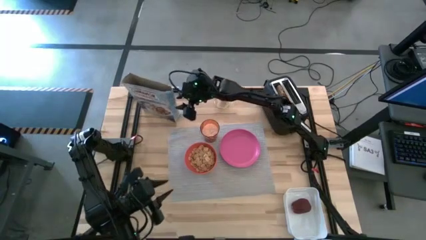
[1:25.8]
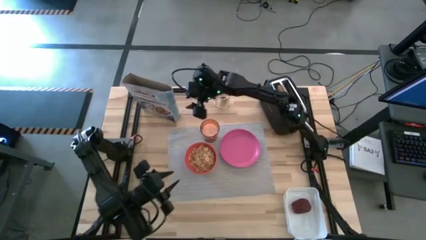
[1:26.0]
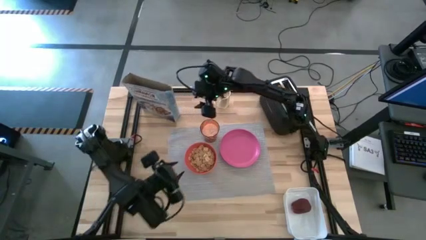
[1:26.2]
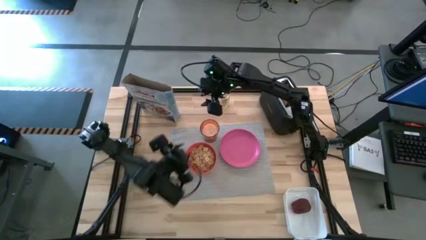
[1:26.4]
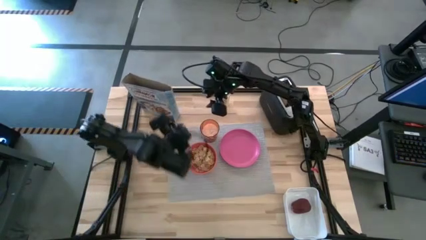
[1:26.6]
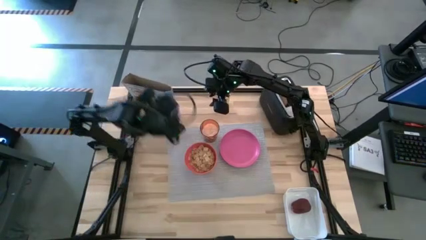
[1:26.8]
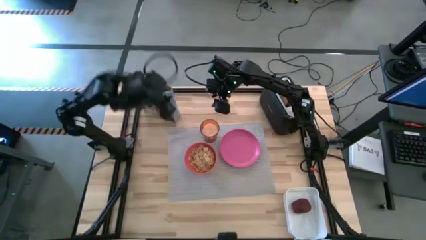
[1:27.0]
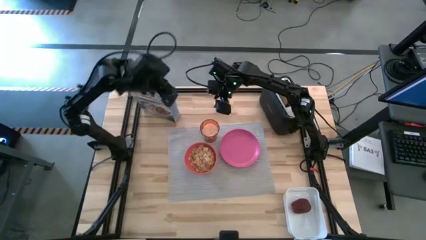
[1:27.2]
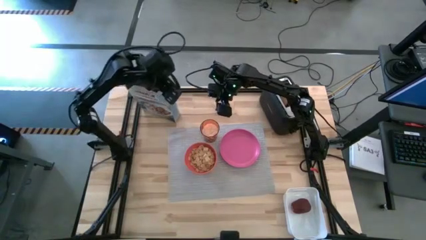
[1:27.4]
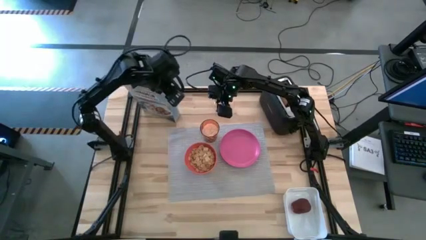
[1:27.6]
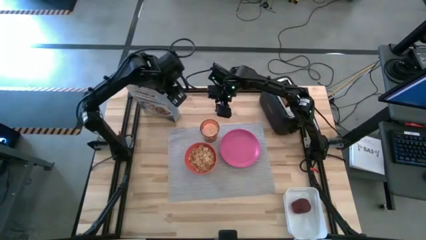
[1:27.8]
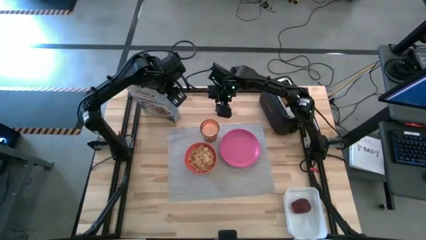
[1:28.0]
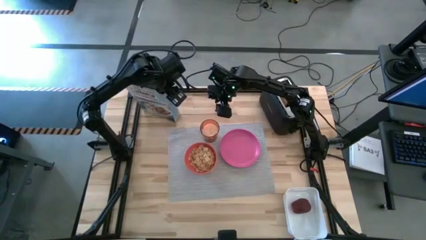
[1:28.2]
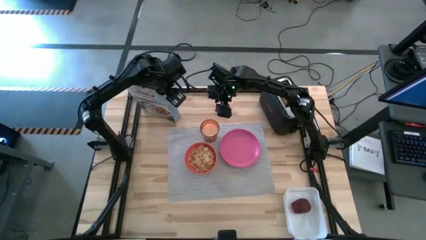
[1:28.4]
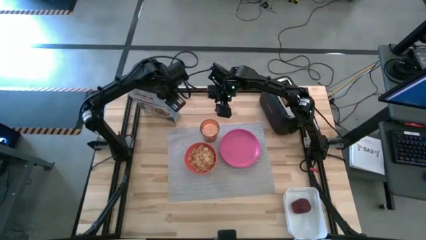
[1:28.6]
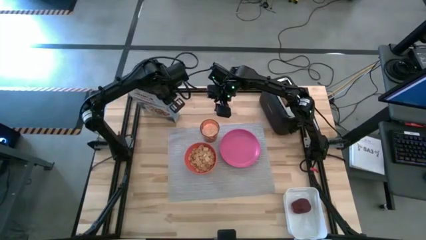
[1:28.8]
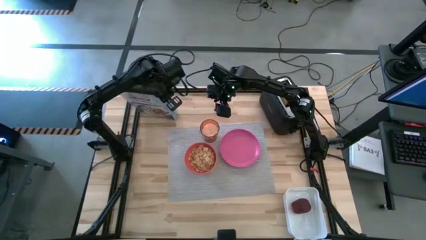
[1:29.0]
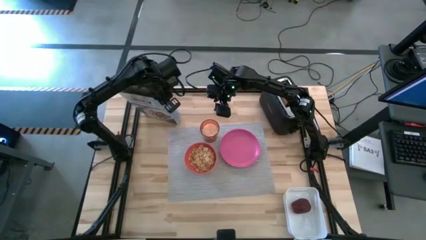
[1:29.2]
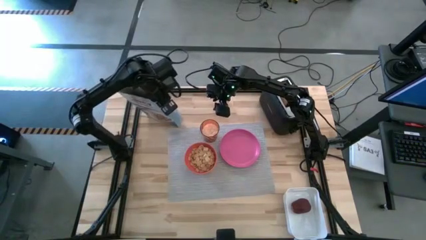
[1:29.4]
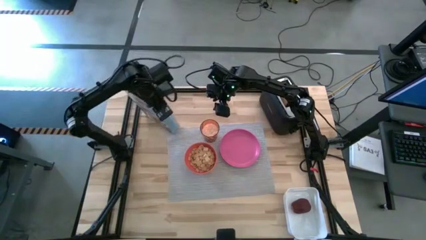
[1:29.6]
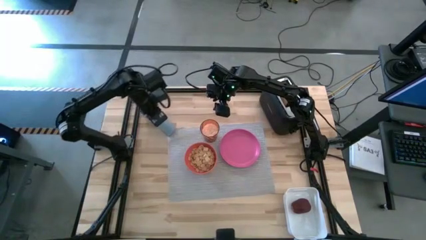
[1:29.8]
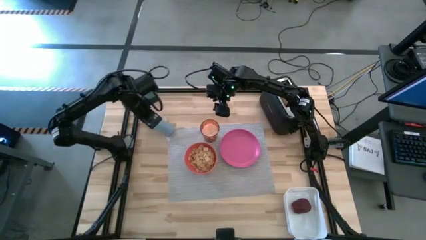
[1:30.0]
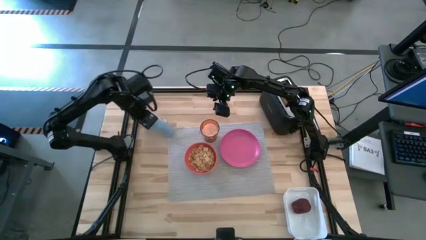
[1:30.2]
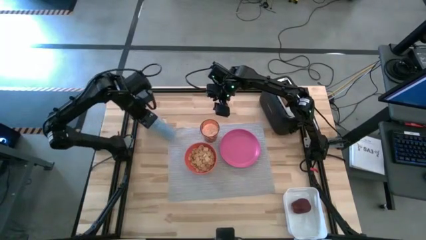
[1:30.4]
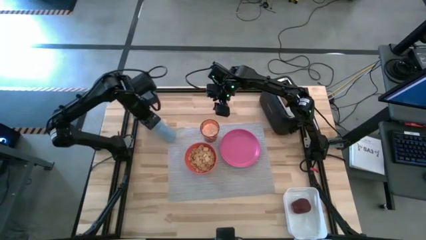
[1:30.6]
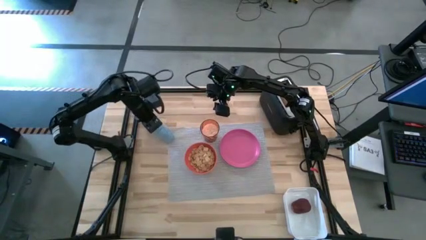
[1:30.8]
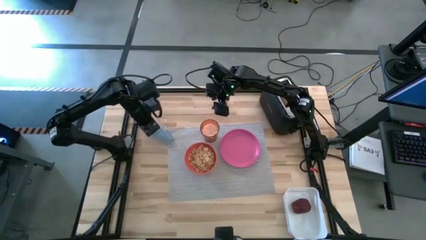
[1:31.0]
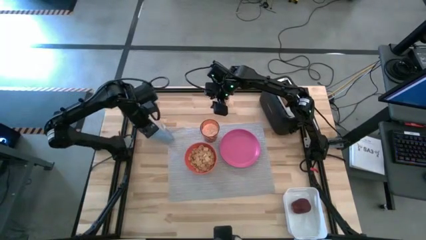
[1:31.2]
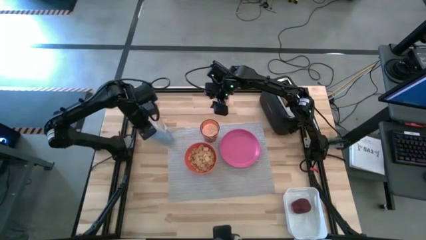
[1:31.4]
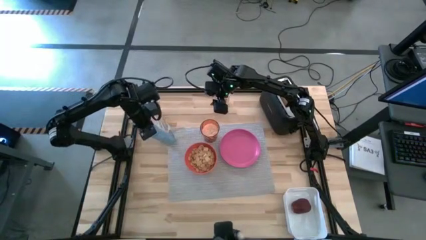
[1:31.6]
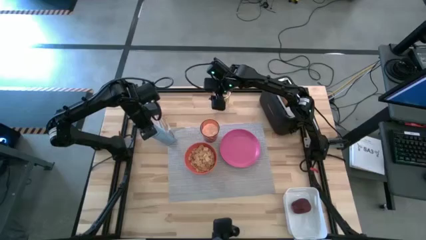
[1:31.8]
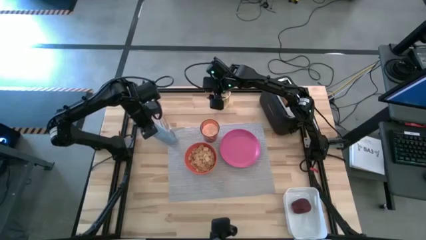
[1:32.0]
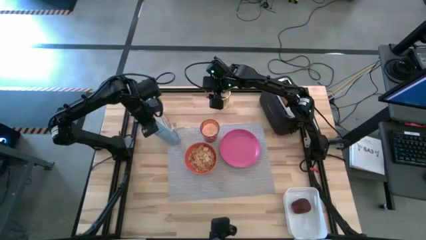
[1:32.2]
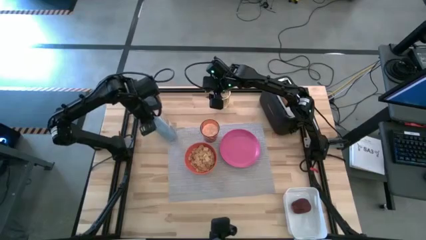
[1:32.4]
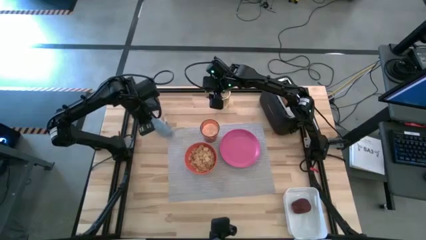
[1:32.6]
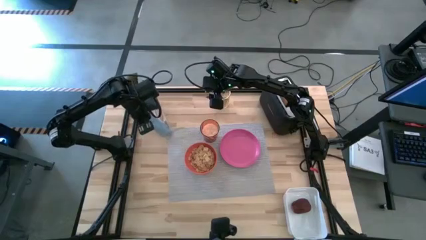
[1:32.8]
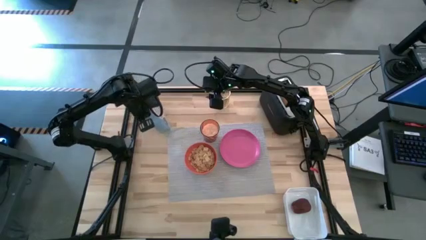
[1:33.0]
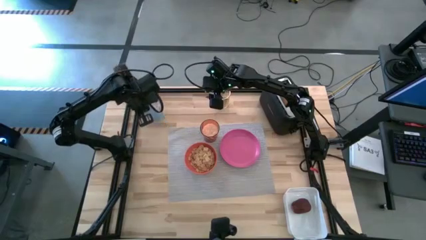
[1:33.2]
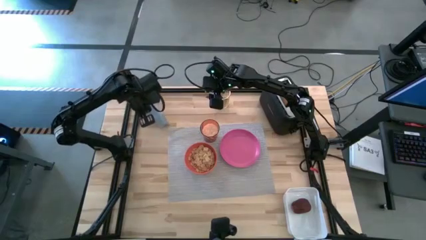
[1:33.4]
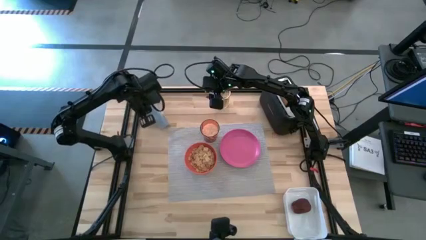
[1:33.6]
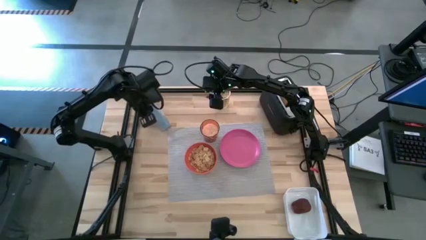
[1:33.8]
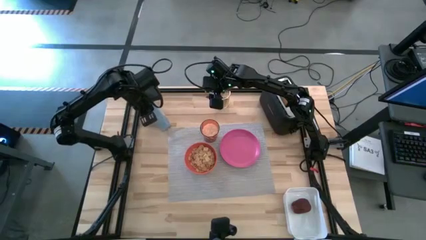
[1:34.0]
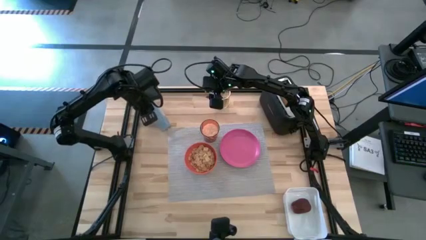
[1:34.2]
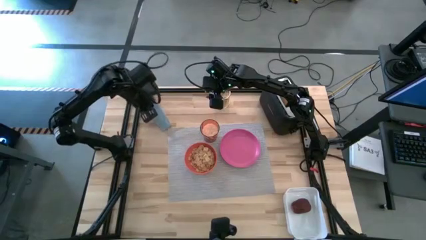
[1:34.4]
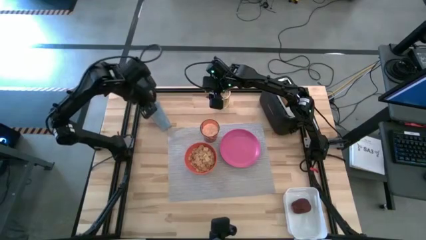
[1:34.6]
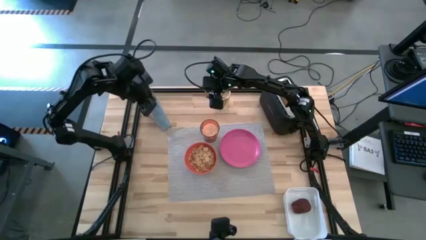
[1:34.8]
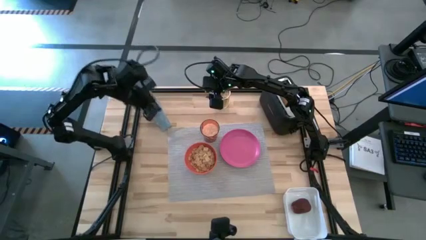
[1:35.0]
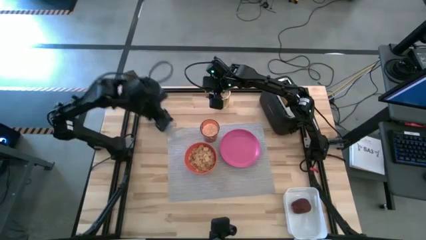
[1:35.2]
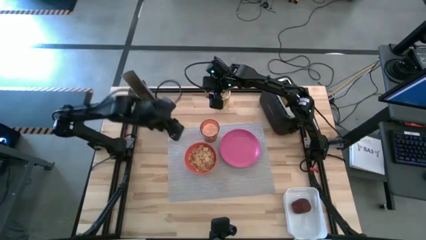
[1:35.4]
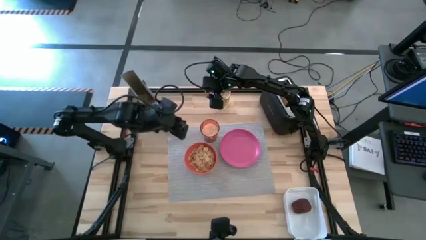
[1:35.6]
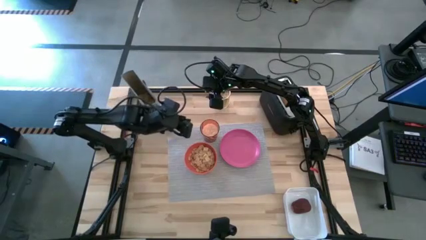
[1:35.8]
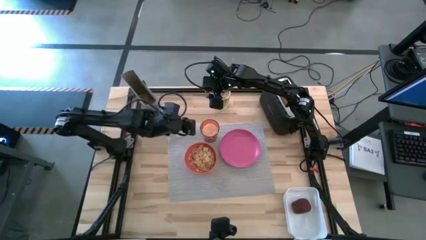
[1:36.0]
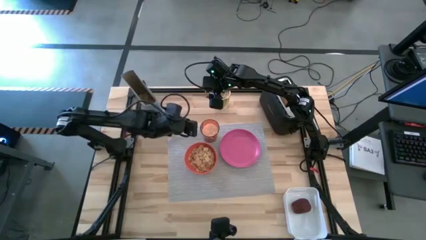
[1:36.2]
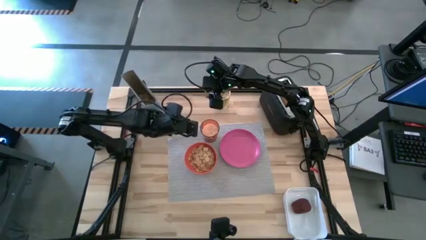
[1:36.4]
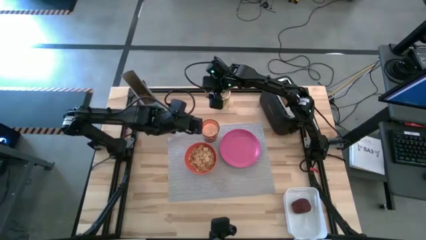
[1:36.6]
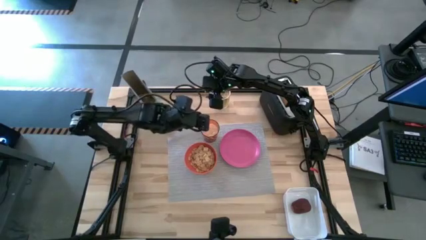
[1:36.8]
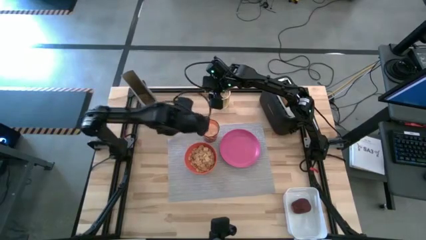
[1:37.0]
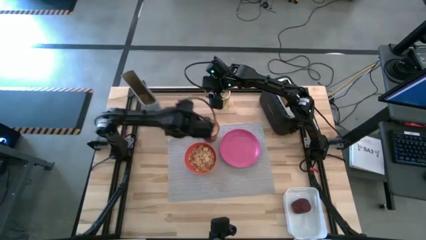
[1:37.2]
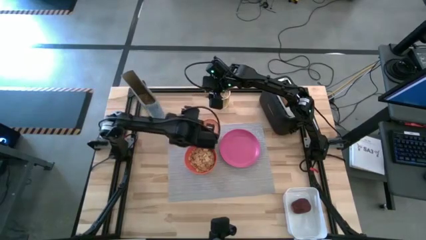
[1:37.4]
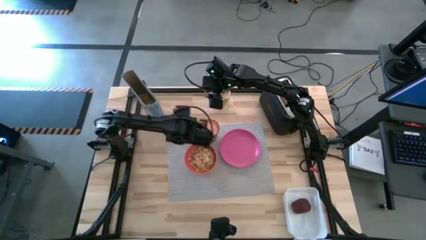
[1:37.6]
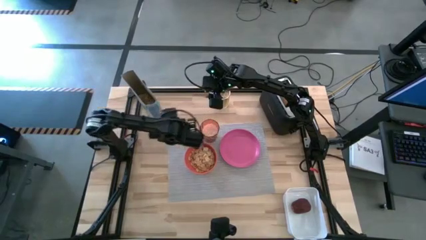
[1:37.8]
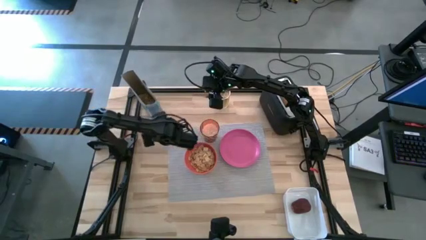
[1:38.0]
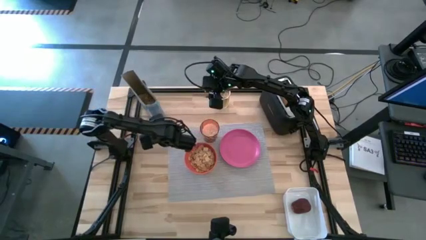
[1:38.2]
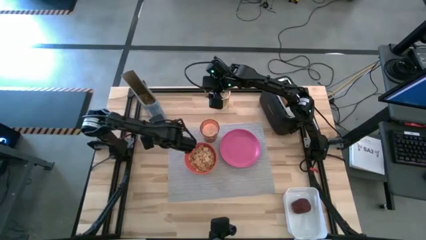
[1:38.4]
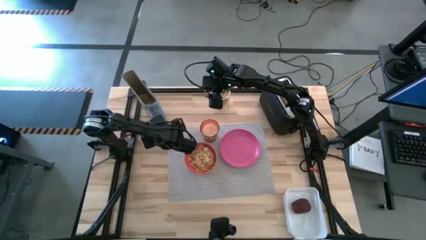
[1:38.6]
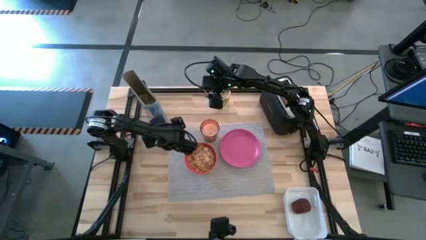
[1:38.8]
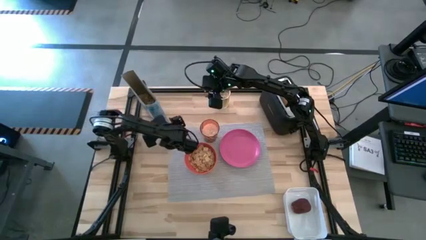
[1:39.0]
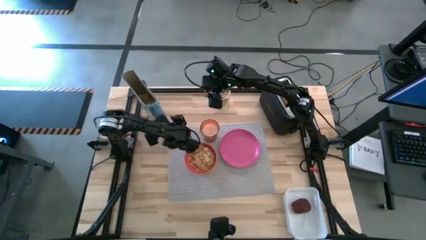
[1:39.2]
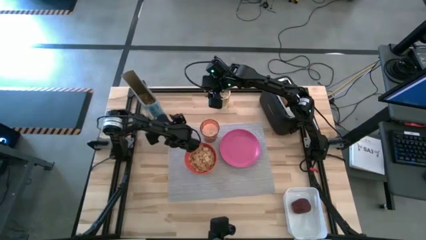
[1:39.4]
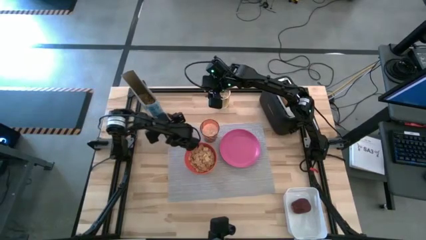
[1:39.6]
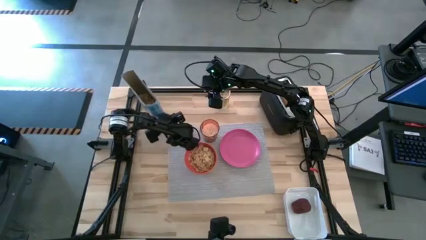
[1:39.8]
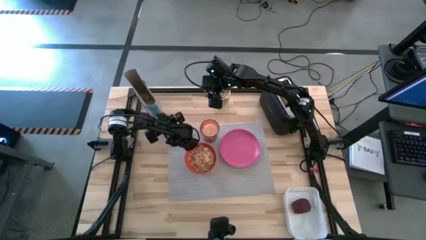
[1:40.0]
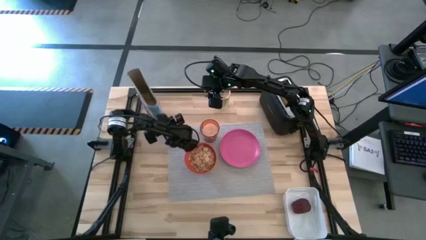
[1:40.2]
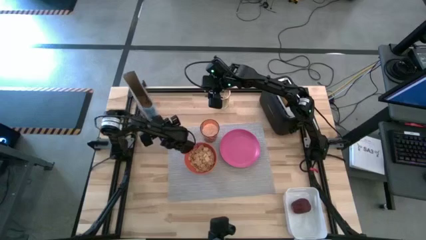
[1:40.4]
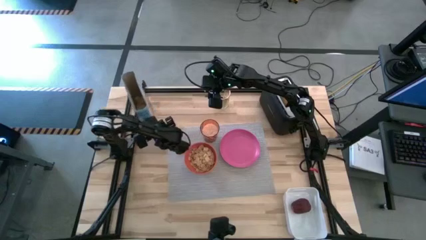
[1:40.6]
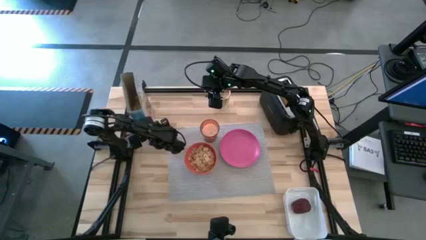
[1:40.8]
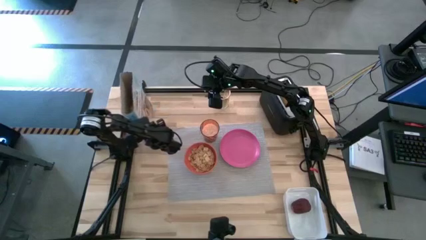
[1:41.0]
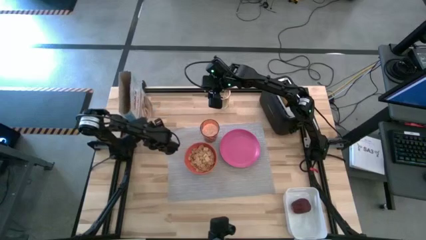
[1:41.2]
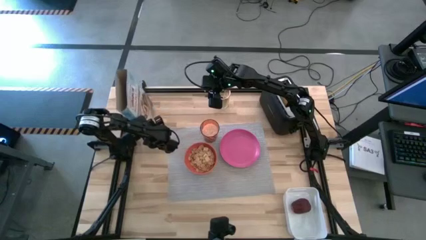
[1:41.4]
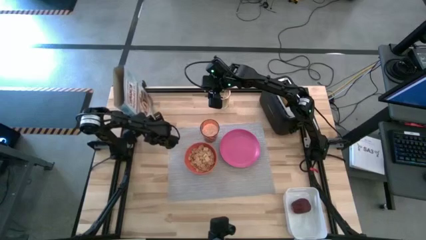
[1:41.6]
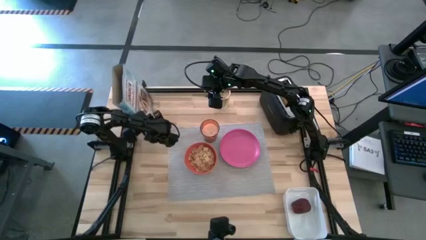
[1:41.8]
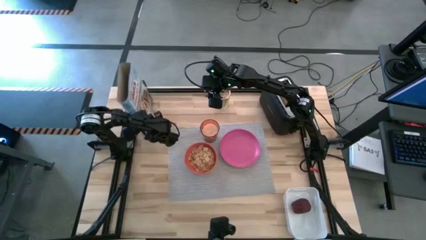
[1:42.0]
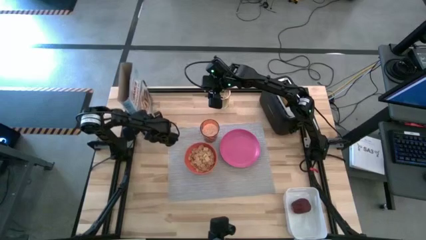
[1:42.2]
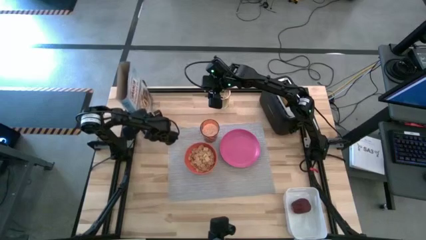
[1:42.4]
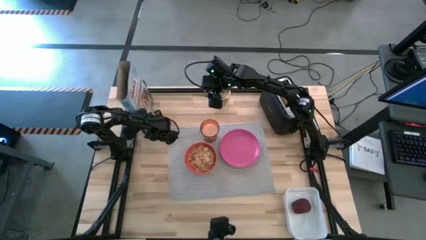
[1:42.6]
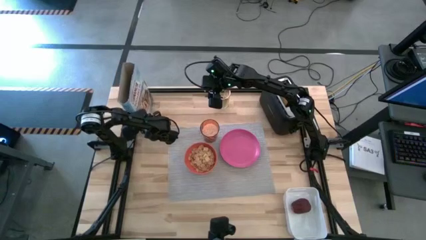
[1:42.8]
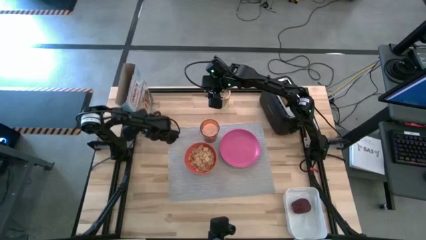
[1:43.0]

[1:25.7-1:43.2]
Task: Arrange a breakfast setting
Pour the cereal from the blue cereal box into the orange bowl
